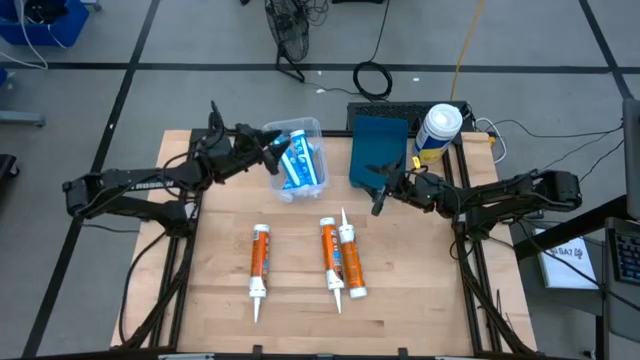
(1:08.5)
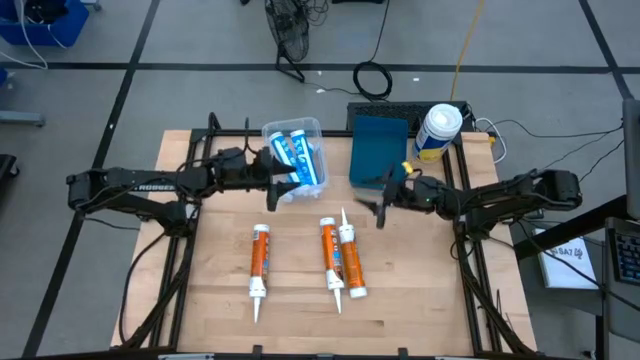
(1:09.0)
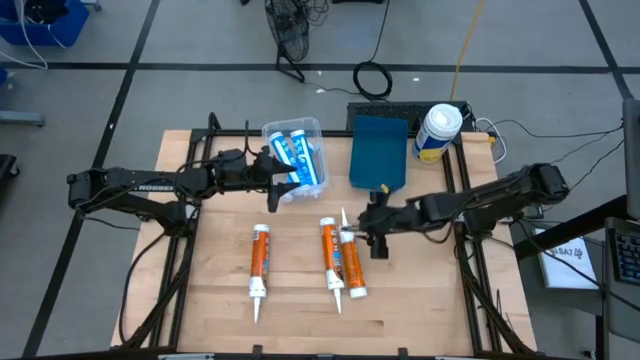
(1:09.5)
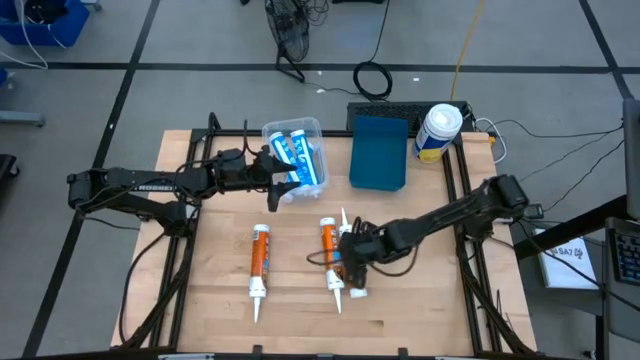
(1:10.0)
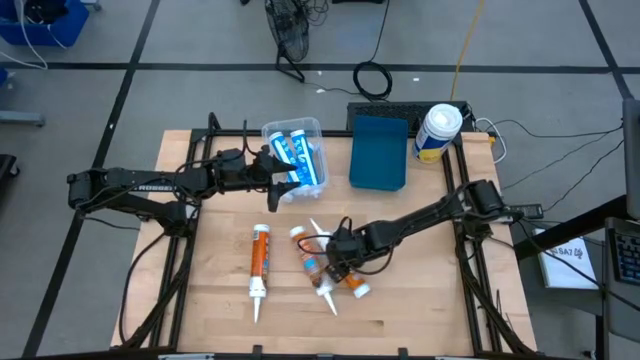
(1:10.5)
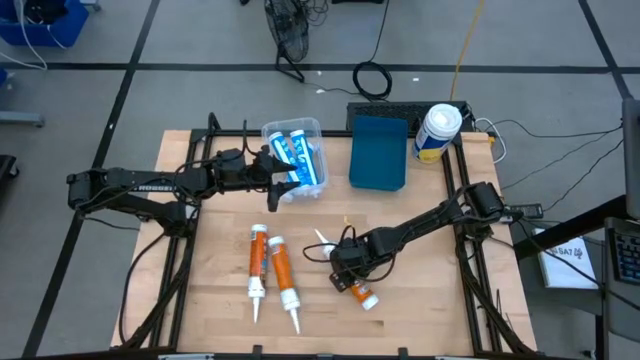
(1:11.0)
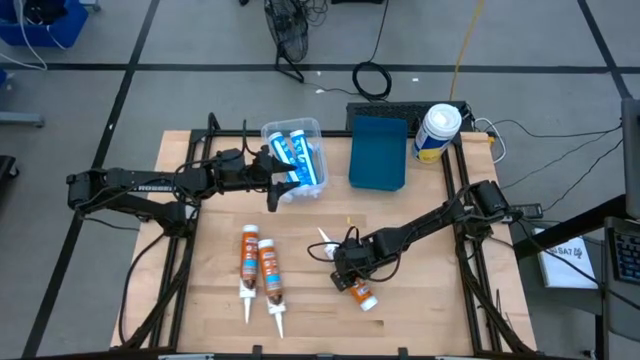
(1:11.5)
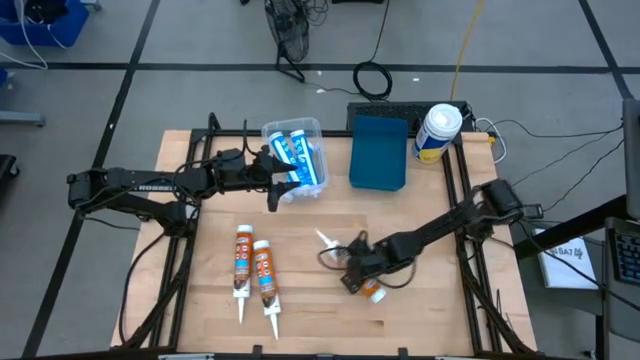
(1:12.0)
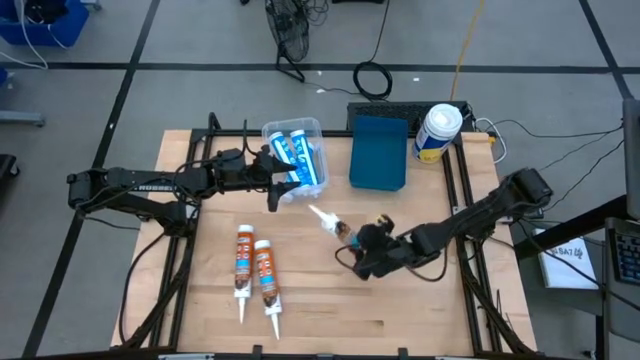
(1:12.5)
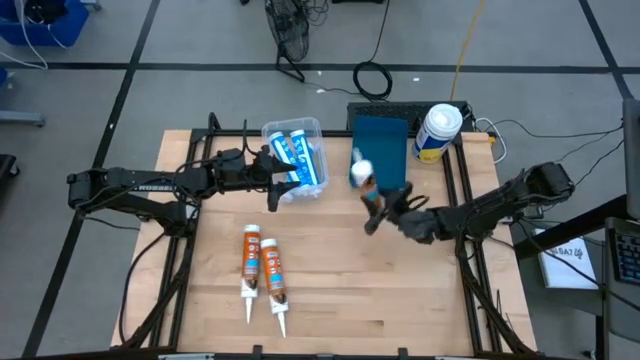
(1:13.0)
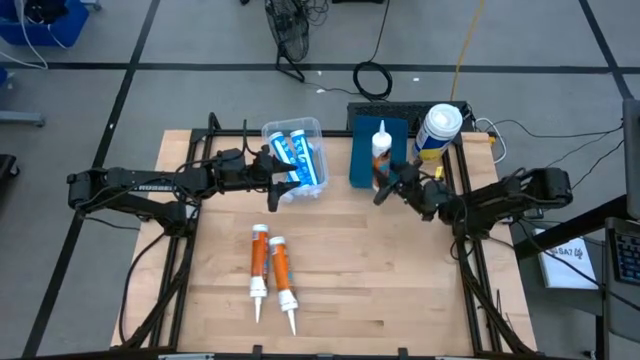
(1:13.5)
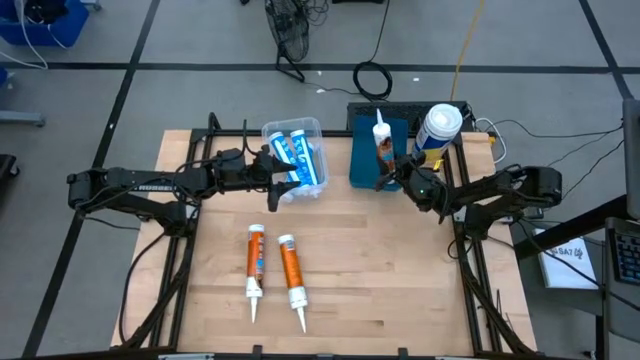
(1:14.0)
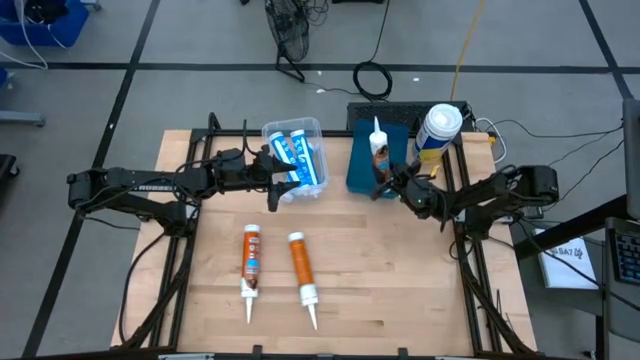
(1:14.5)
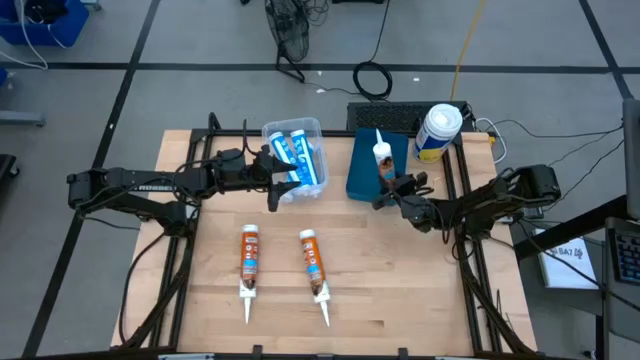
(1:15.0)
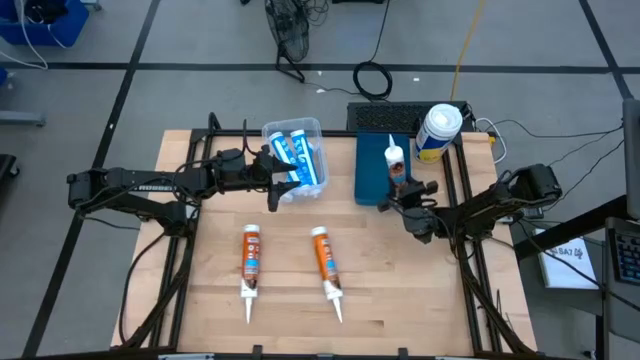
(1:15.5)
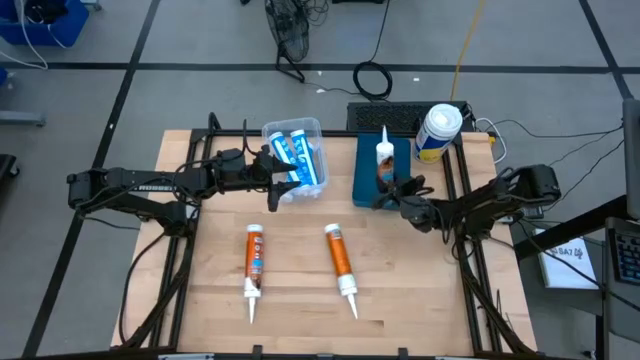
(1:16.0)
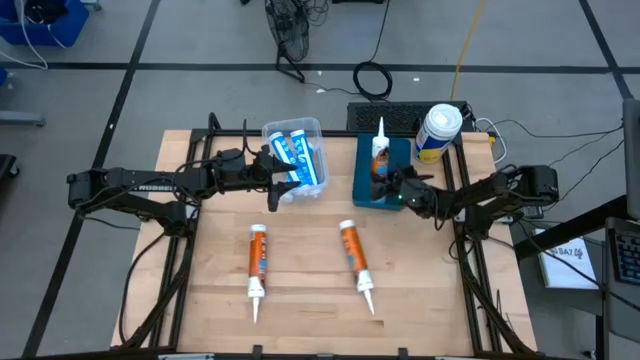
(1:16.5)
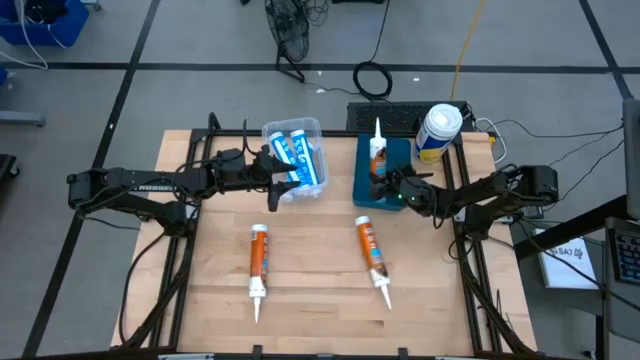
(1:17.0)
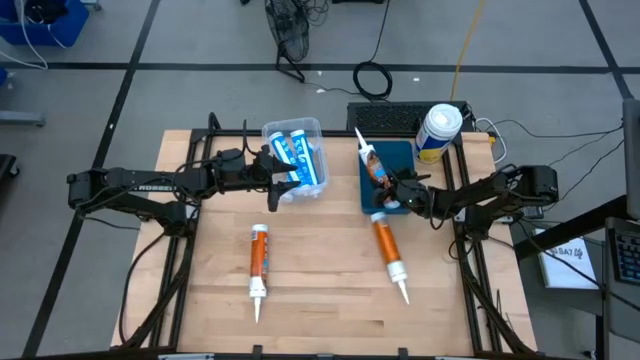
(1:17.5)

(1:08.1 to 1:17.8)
Task: Pick & place silicon tubes, Sealant and Lysol wipes
Put the right orange sealant into the blue bin

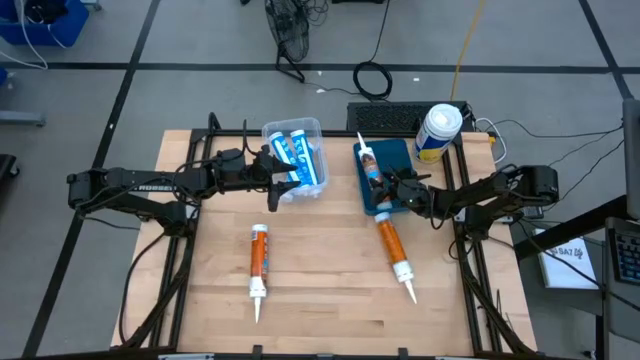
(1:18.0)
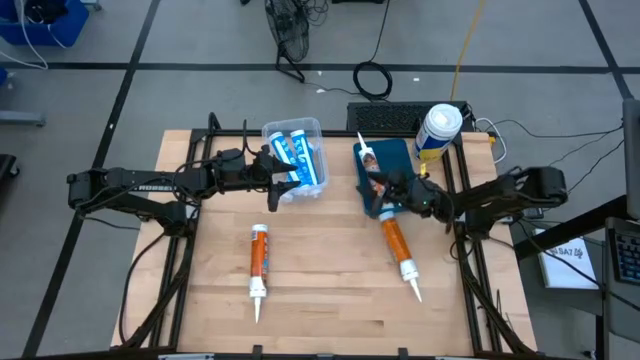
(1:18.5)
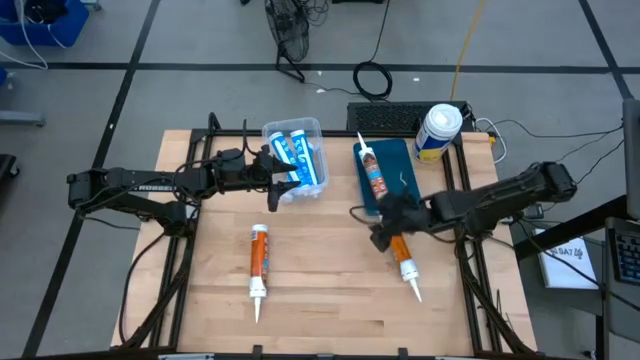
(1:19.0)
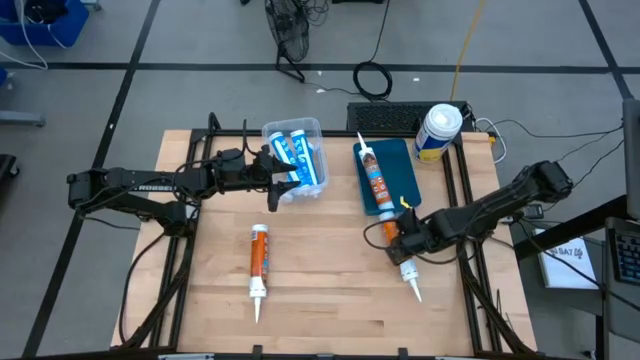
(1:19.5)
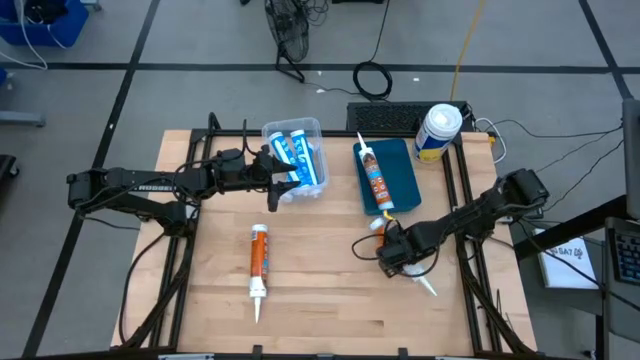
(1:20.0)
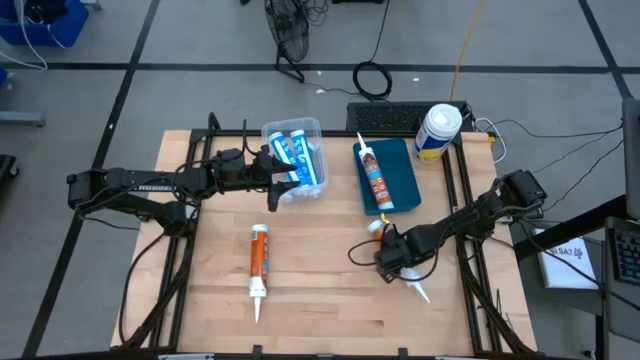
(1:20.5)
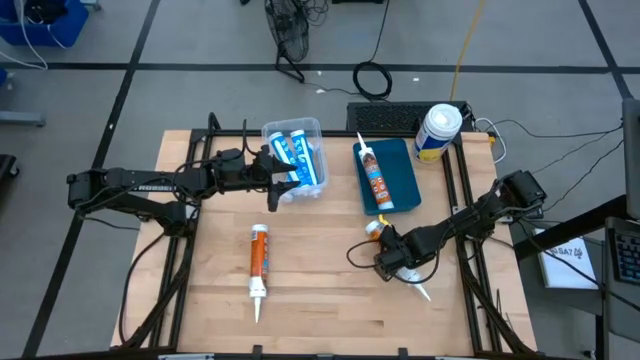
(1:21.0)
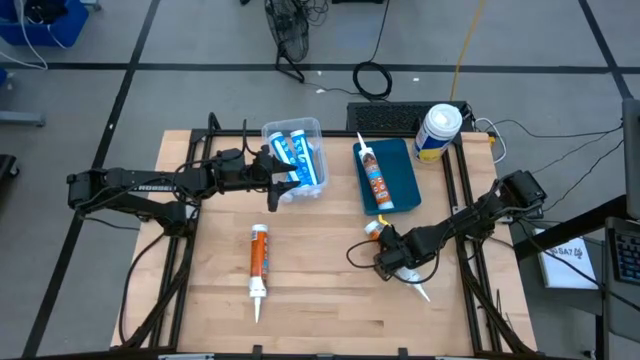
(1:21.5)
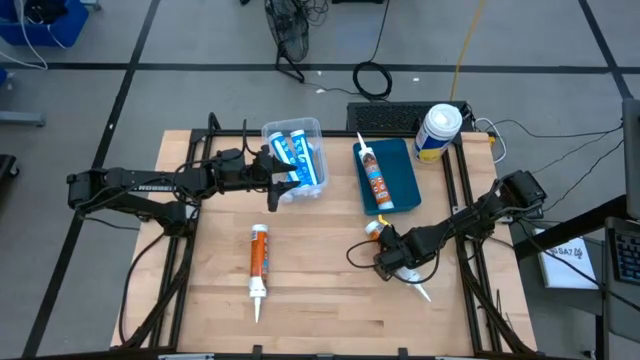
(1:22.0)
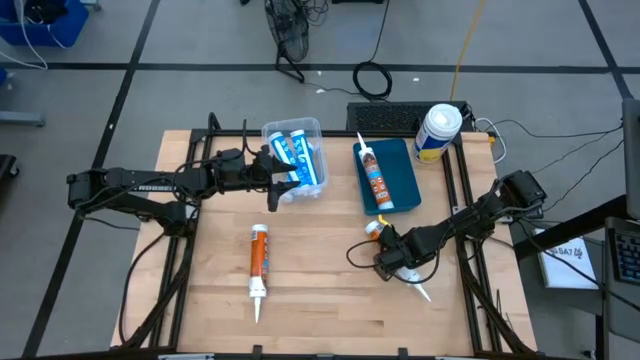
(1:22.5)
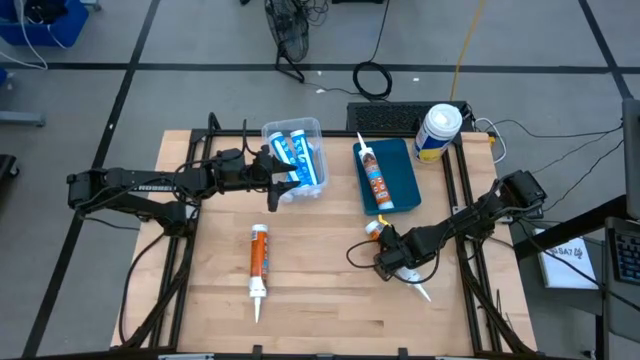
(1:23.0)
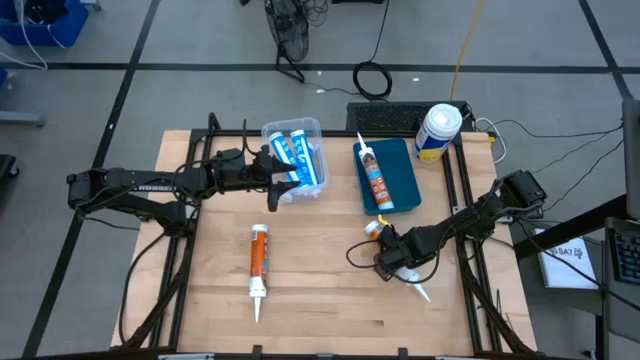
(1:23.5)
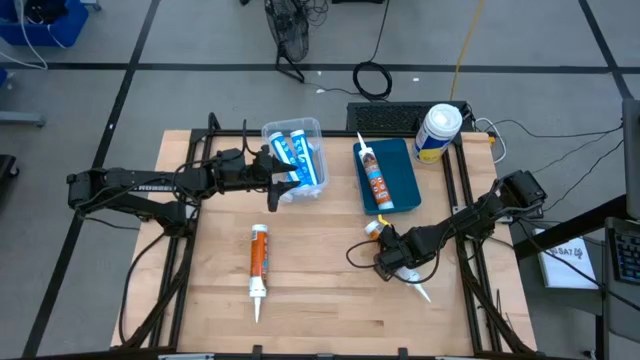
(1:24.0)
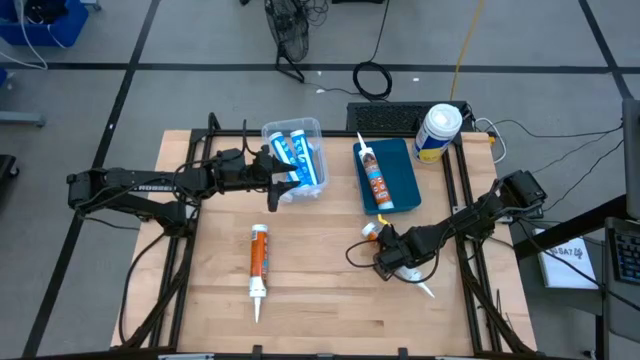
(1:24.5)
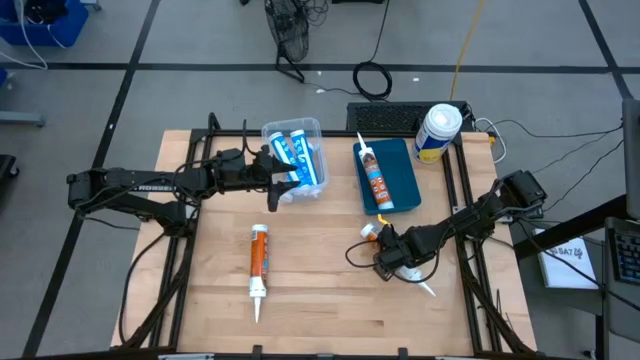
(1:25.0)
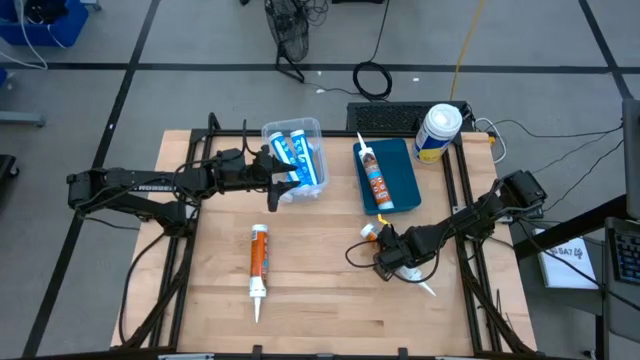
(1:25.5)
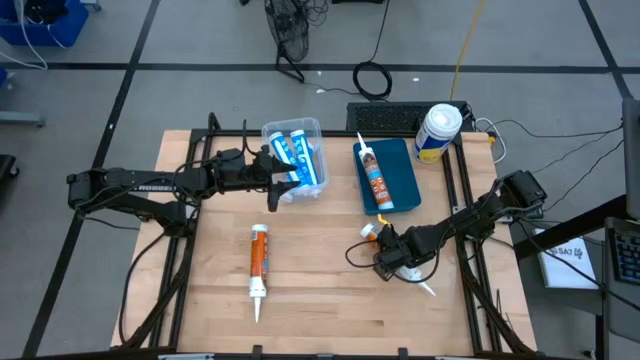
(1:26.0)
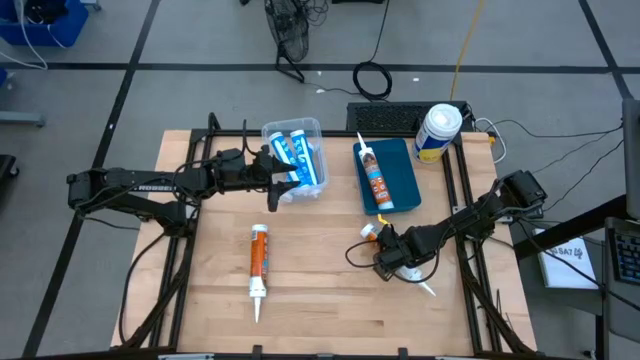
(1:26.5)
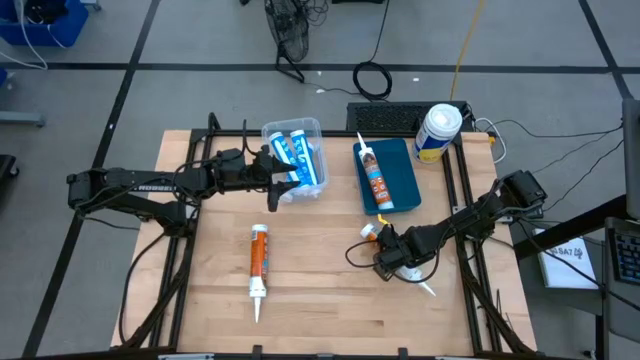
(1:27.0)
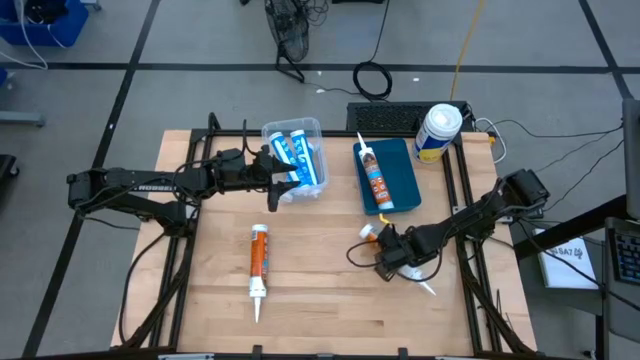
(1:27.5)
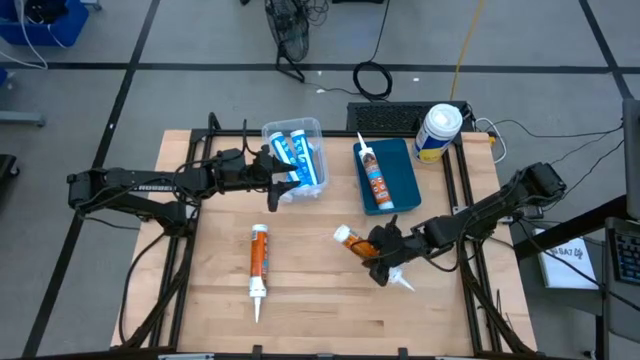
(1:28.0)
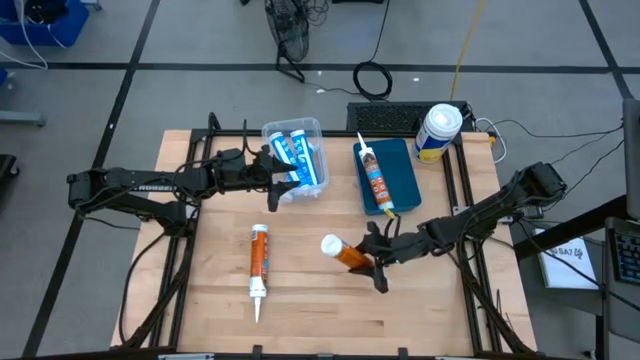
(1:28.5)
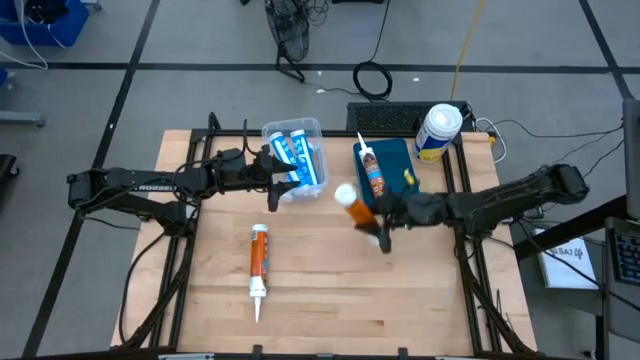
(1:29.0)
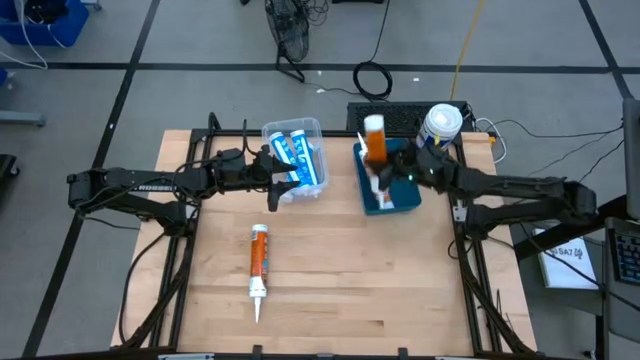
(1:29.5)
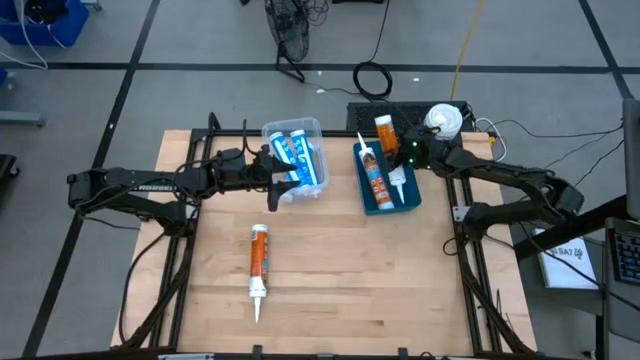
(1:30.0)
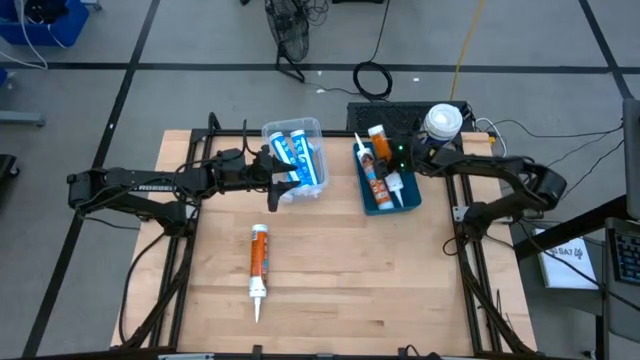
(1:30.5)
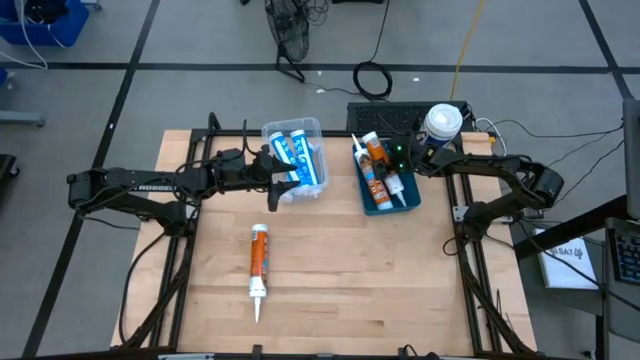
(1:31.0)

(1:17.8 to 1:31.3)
Put the right orange sealant into the blue bin
